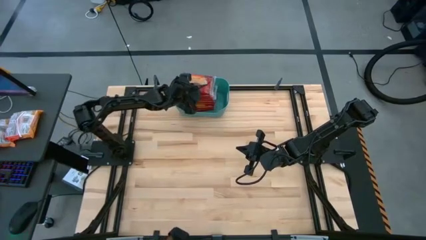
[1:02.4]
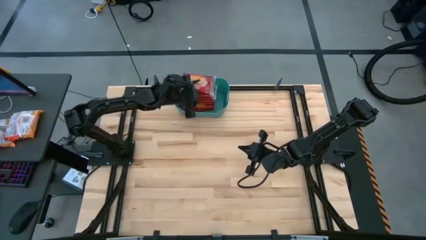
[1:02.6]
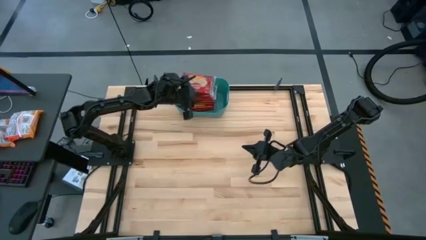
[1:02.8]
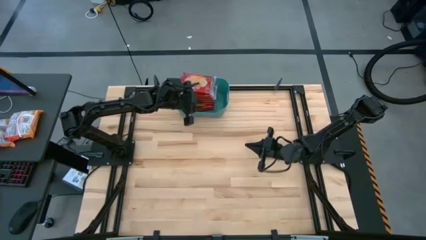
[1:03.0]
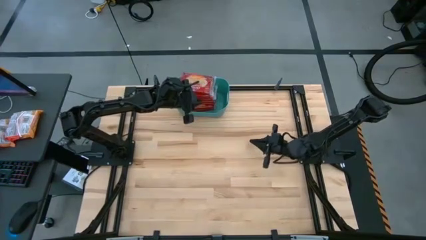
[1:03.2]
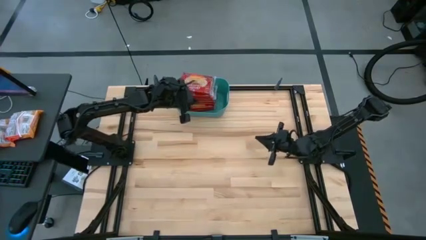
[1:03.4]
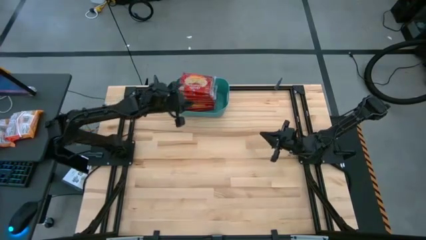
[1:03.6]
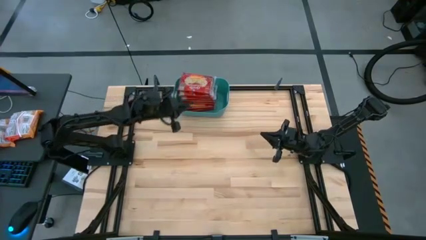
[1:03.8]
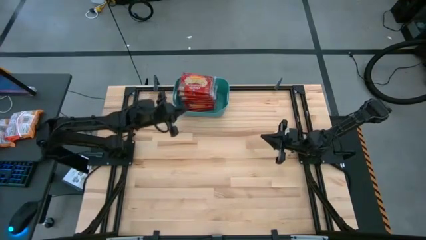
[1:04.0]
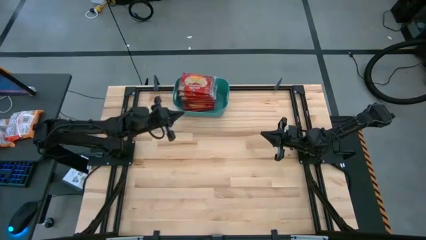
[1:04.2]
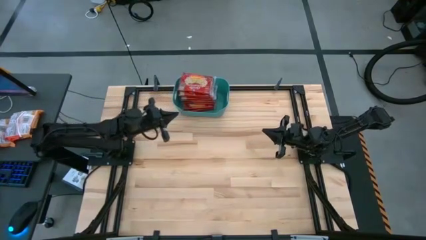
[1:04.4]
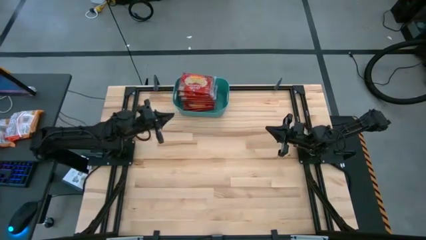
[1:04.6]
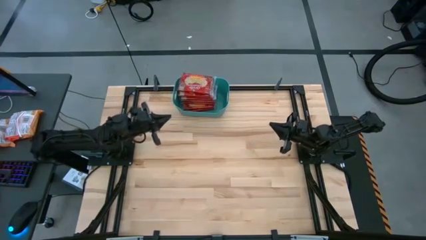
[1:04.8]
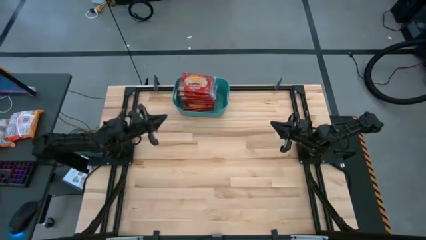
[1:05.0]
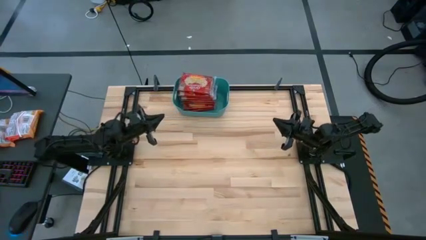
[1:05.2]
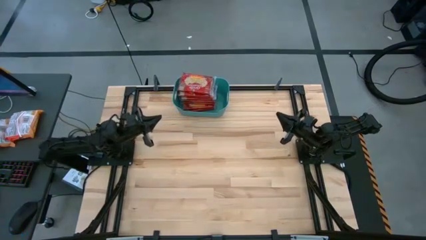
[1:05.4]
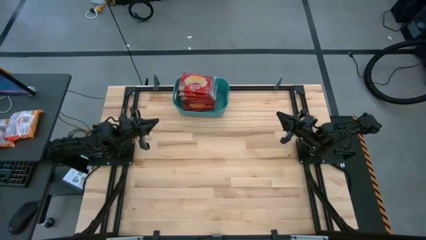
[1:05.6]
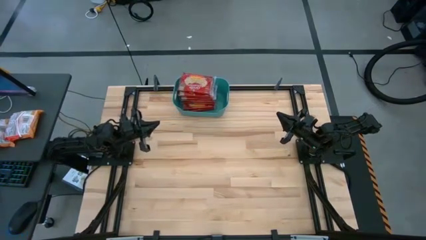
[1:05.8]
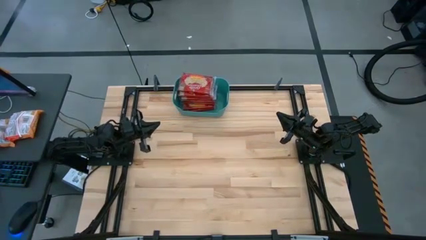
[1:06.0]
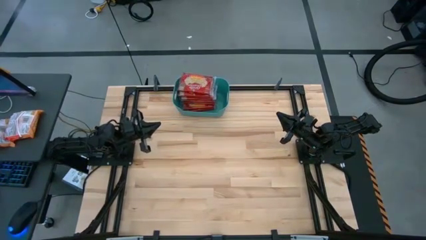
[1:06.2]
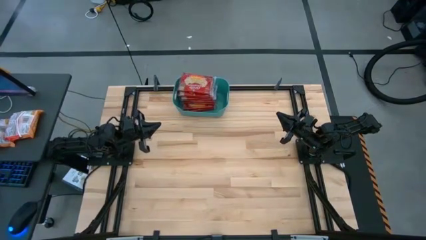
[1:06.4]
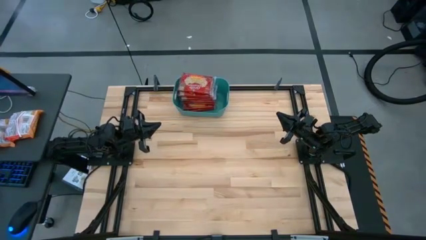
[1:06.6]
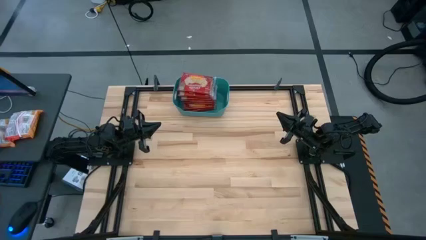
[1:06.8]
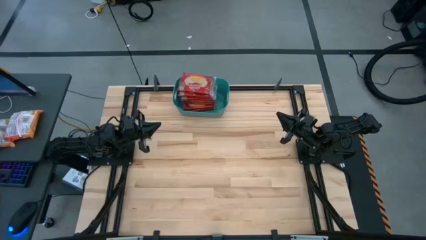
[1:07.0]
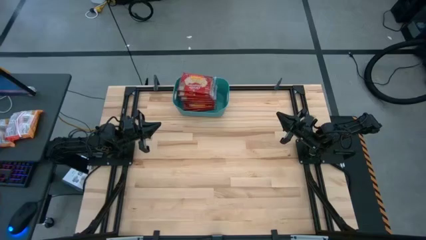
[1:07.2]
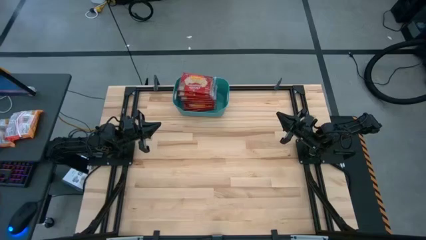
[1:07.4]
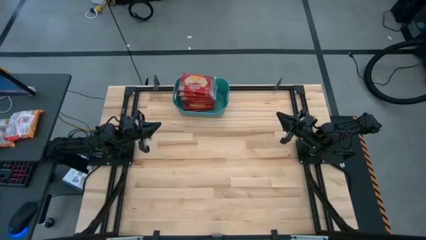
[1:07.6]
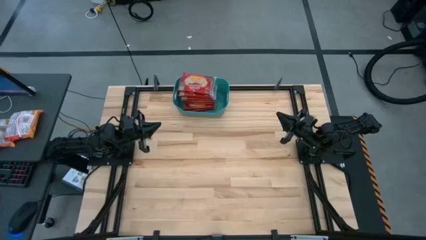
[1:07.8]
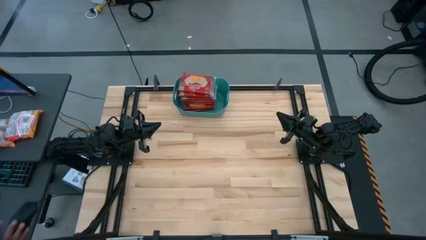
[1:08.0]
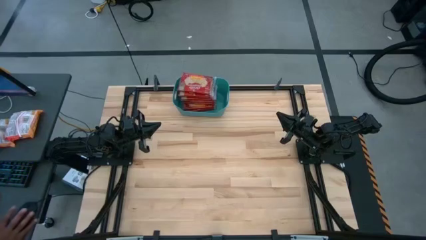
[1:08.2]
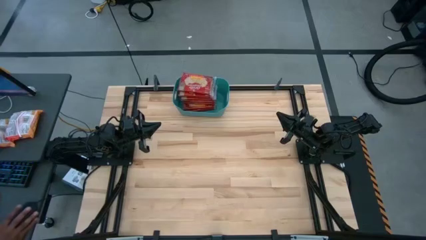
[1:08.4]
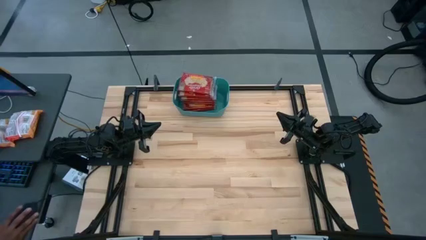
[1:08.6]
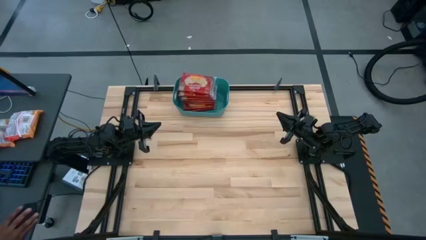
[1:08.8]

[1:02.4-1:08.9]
Task: Sort popcorn bags into baskets
Return to Home Position

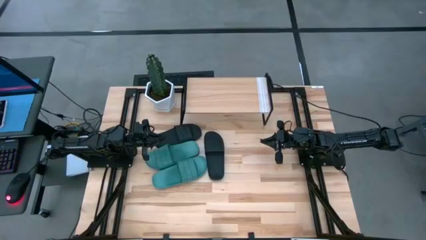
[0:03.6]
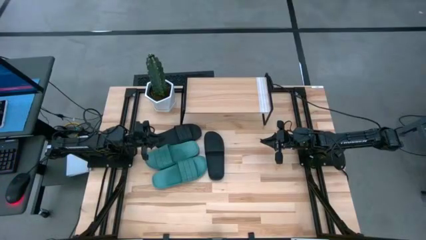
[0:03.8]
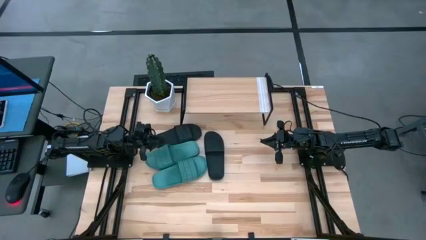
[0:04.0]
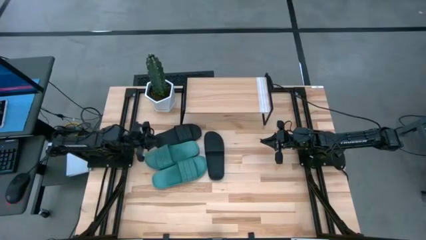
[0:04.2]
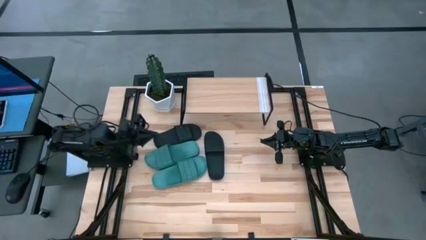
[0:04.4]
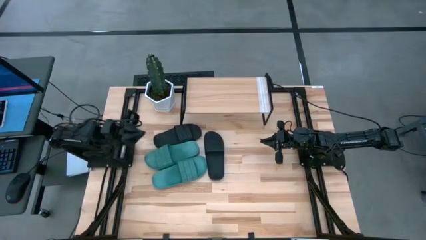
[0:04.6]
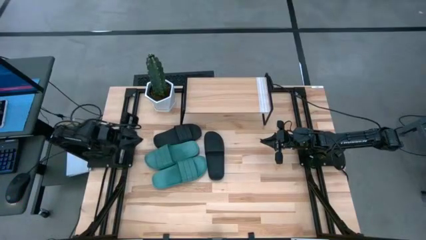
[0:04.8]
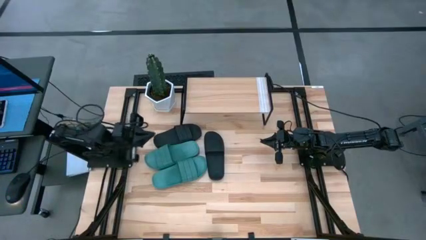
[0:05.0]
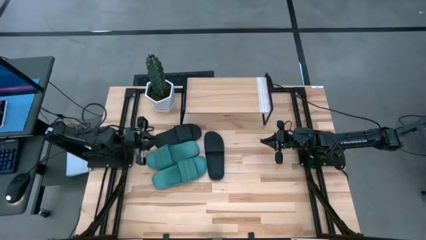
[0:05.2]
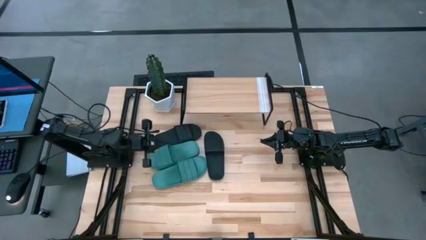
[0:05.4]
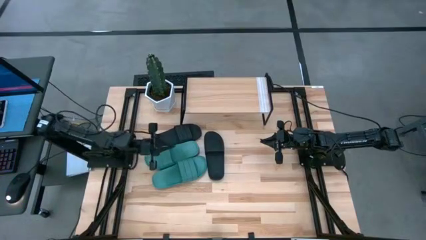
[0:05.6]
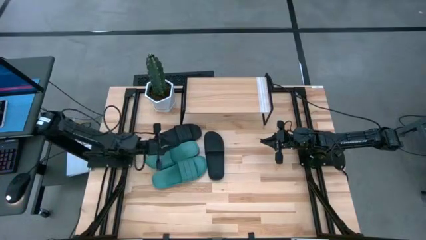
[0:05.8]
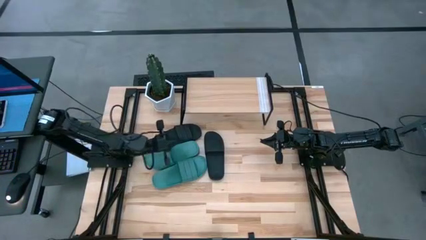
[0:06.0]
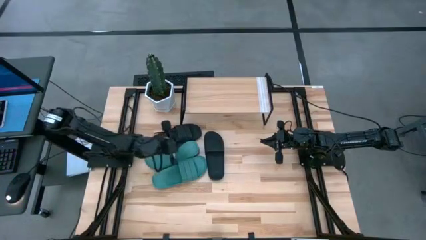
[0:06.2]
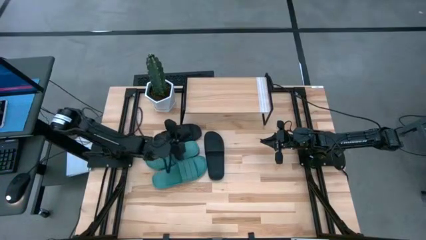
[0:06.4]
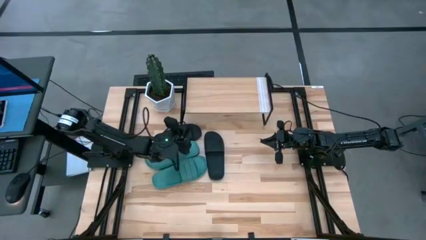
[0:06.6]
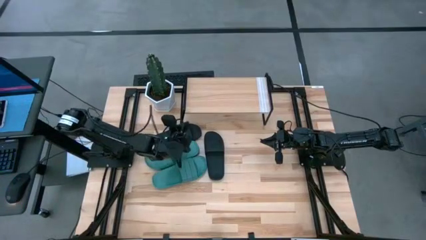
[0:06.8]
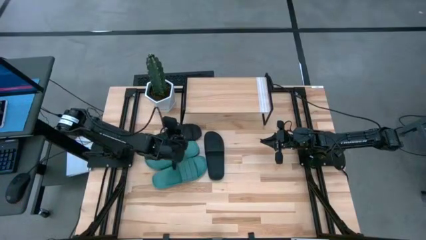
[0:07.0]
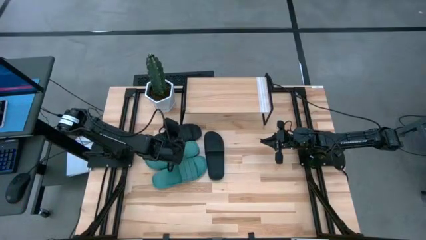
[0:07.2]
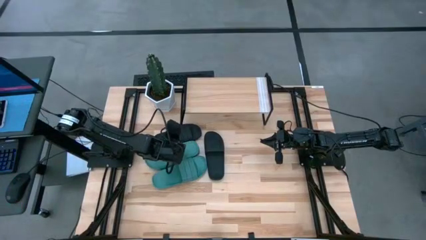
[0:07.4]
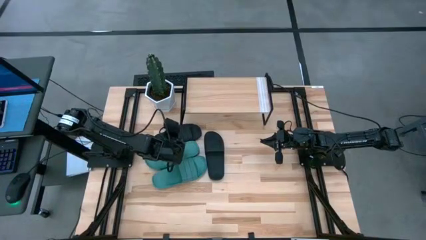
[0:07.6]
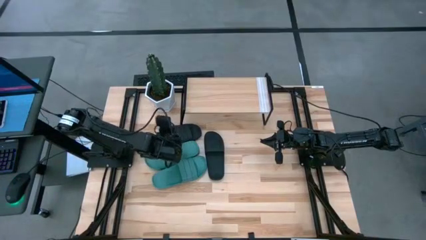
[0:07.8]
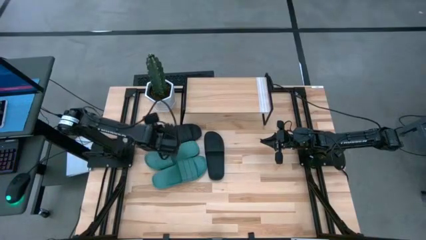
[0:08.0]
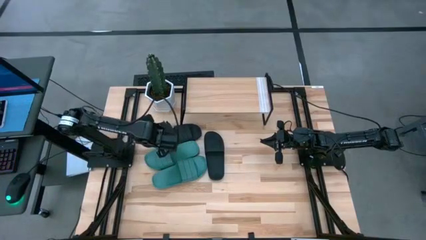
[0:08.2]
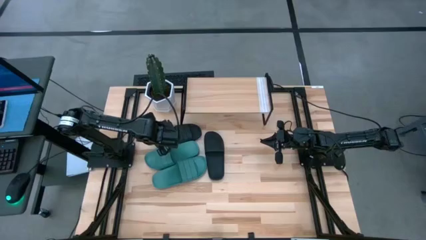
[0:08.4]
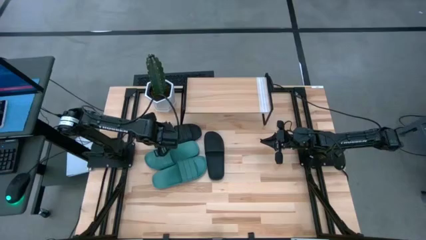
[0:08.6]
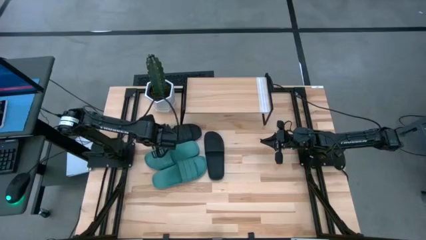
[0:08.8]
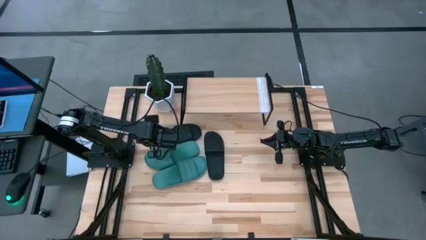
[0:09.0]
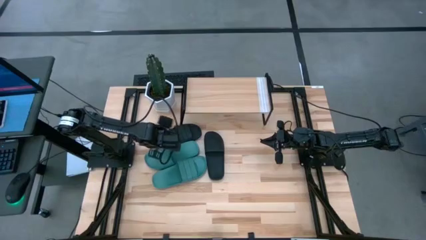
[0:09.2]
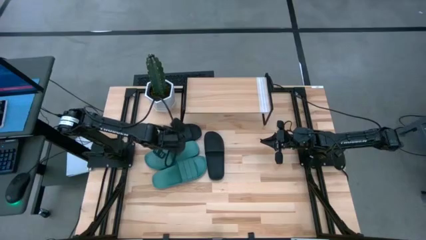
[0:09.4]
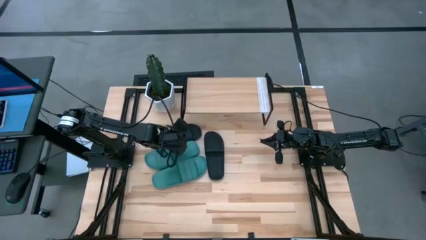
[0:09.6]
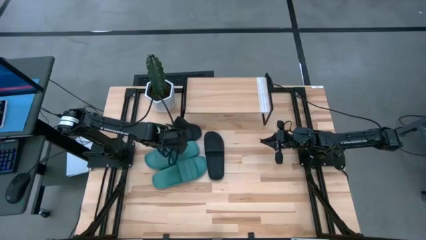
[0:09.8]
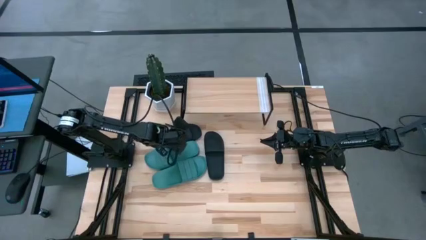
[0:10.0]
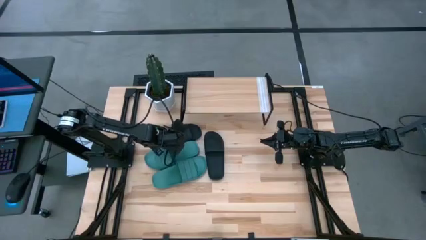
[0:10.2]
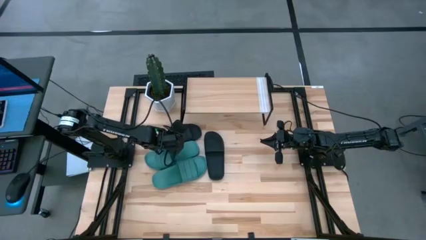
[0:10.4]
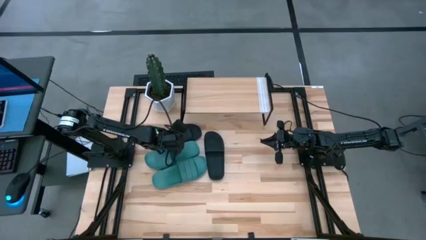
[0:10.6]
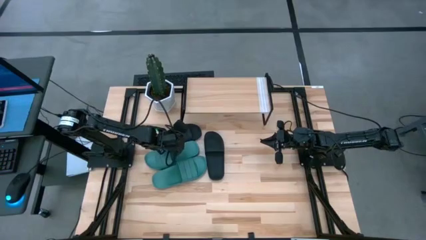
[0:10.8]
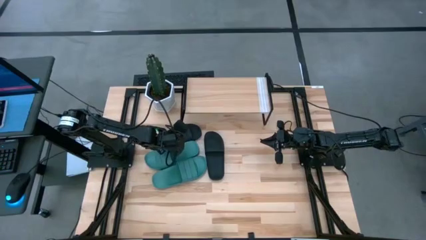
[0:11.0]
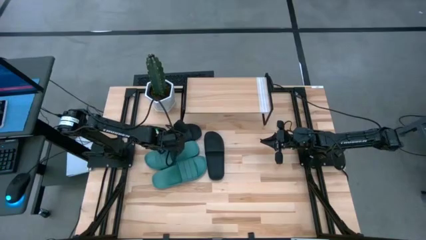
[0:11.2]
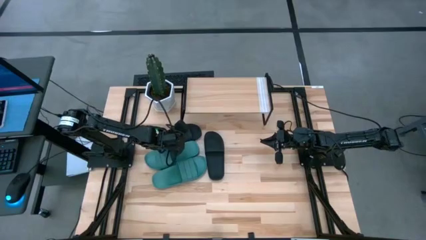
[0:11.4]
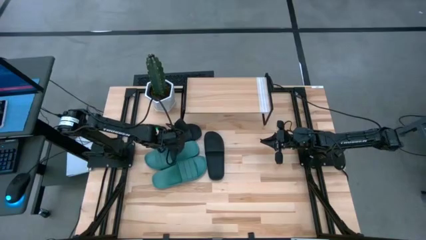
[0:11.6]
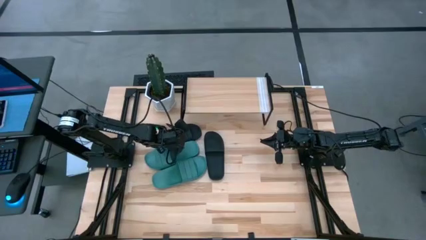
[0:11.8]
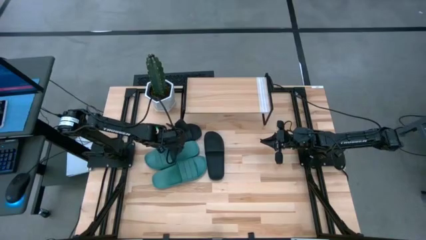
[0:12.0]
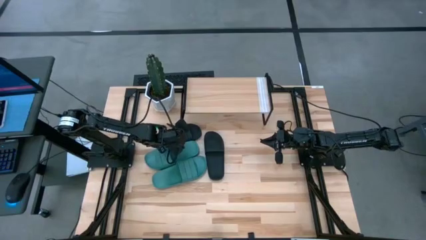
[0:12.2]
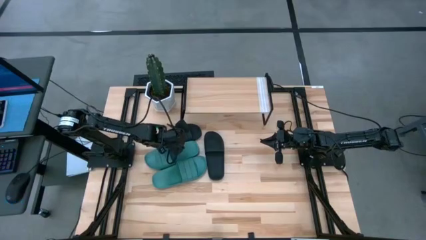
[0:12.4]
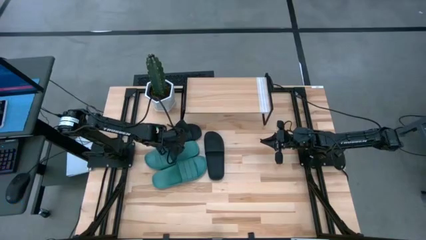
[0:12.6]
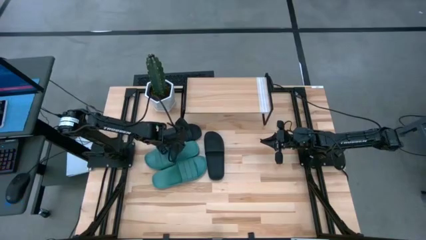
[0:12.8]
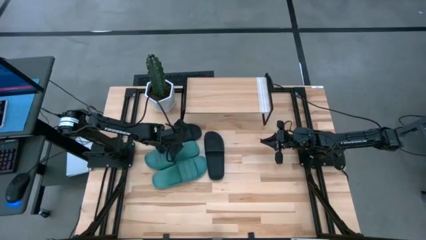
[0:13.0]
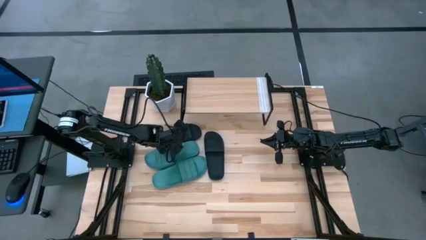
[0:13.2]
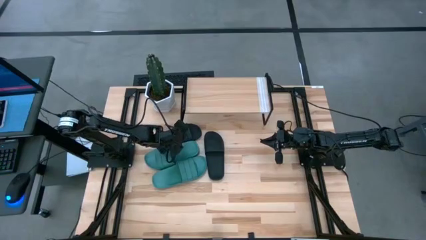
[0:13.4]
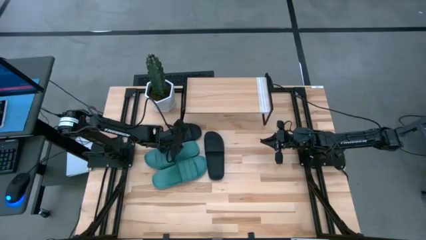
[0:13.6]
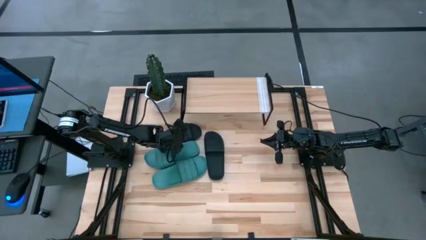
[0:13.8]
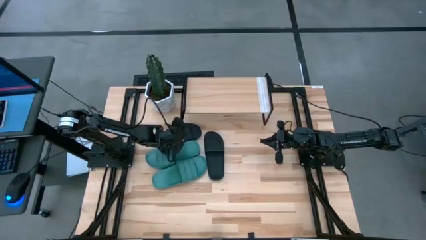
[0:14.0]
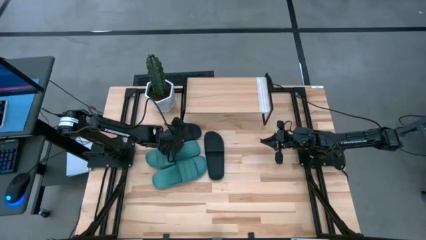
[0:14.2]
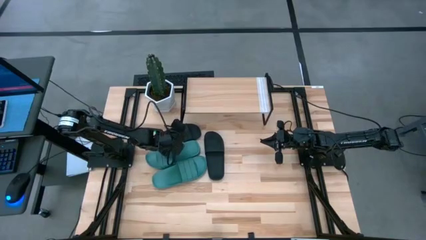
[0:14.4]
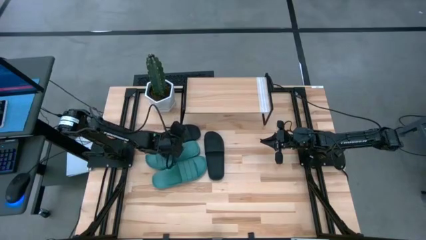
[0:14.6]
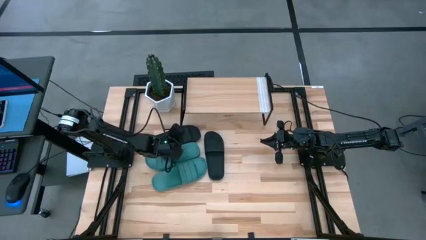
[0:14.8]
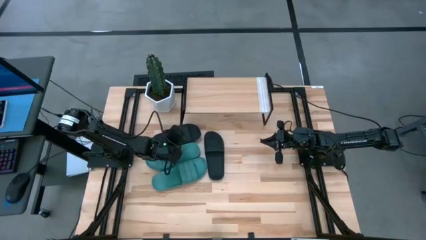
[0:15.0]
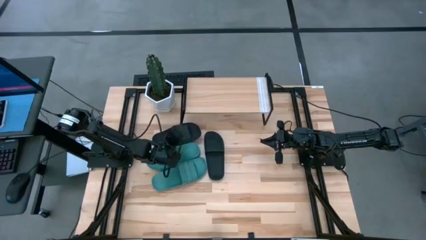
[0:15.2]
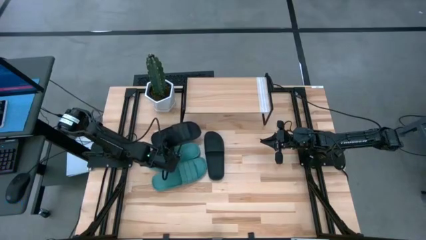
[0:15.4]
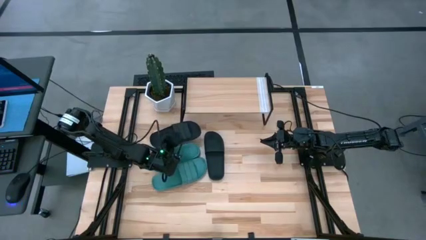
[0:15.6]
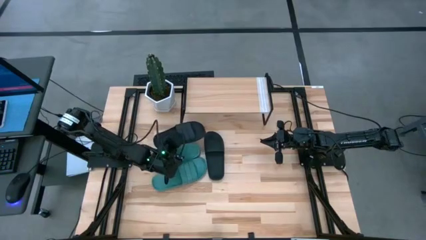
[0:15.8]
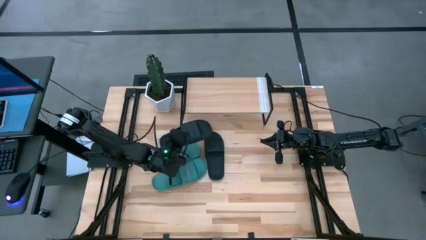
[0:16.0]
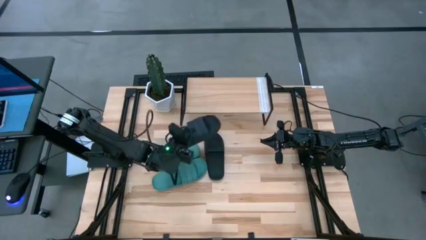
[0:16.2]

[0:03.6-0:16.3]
Task: Pick and place slides into the shelf
Put the left black slide on the shelf
